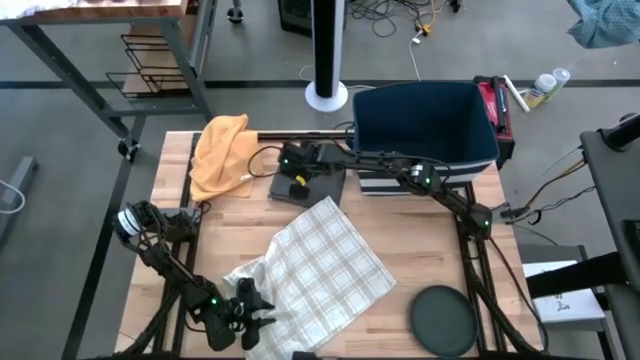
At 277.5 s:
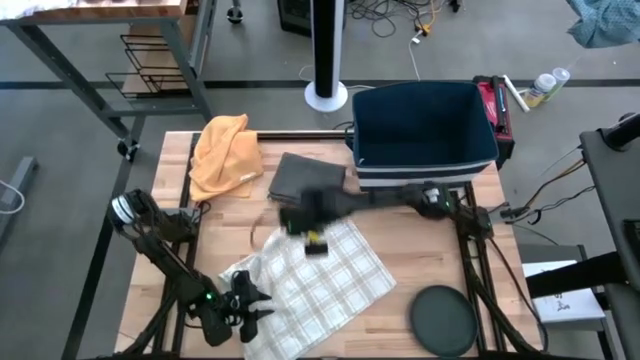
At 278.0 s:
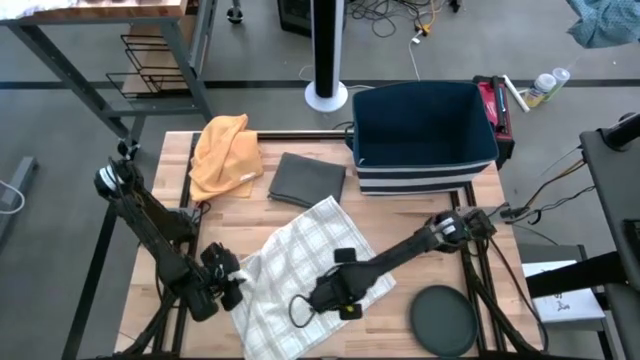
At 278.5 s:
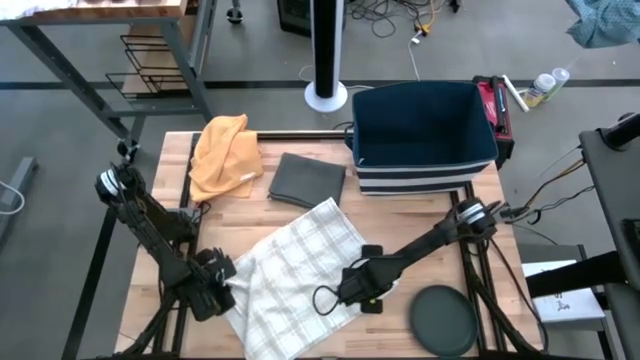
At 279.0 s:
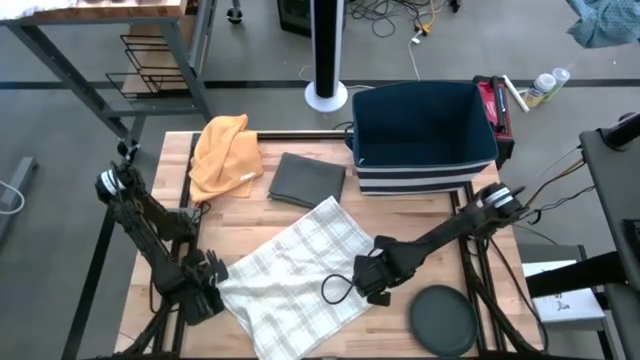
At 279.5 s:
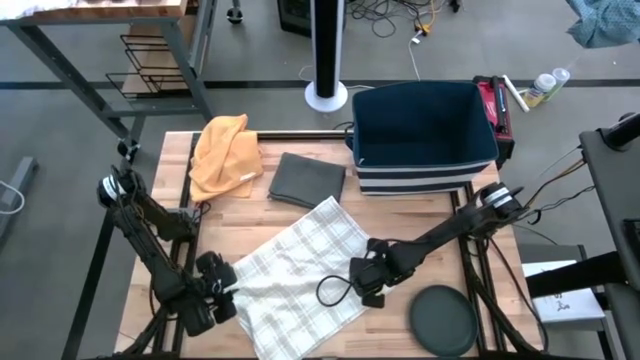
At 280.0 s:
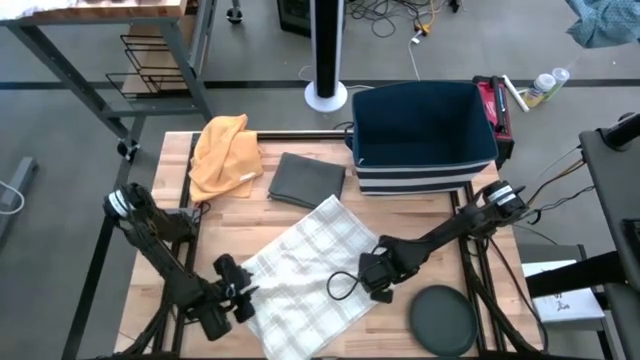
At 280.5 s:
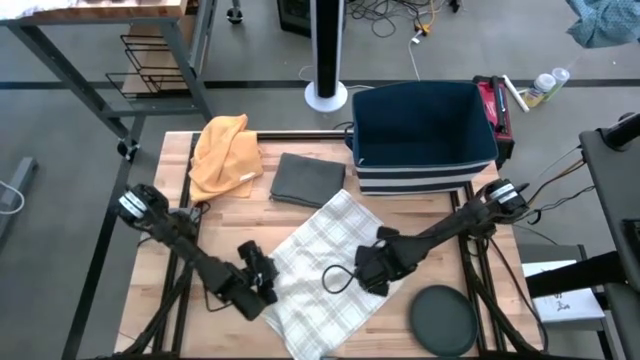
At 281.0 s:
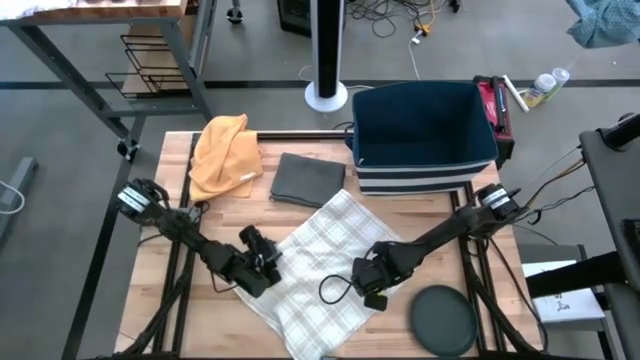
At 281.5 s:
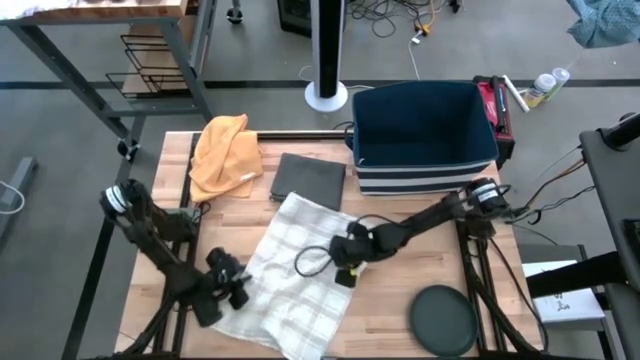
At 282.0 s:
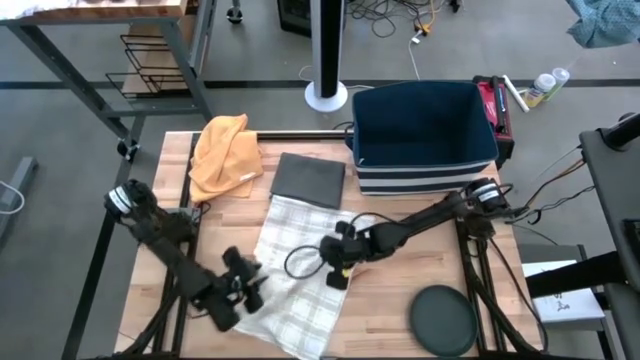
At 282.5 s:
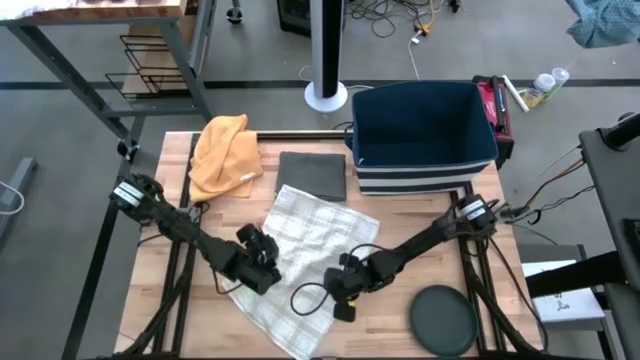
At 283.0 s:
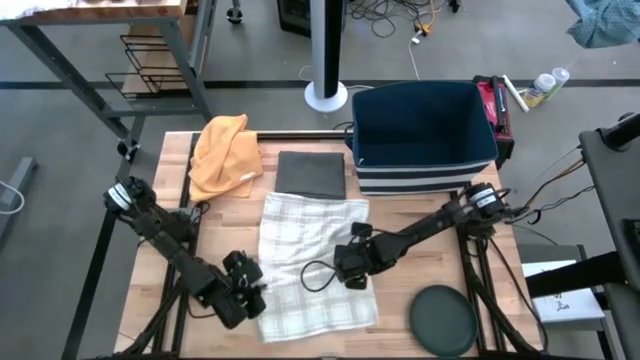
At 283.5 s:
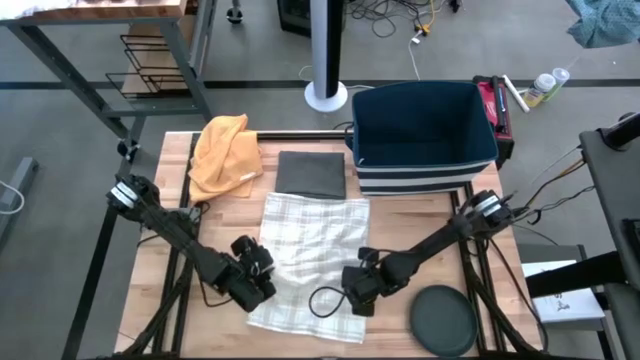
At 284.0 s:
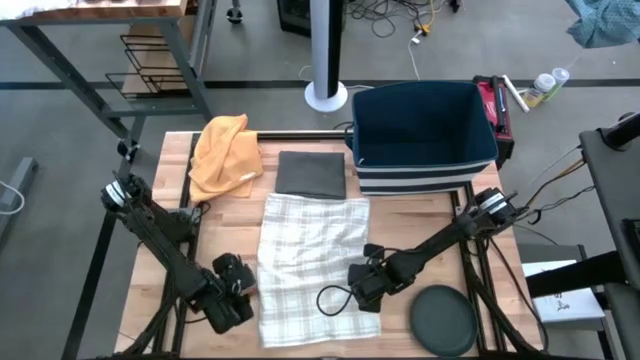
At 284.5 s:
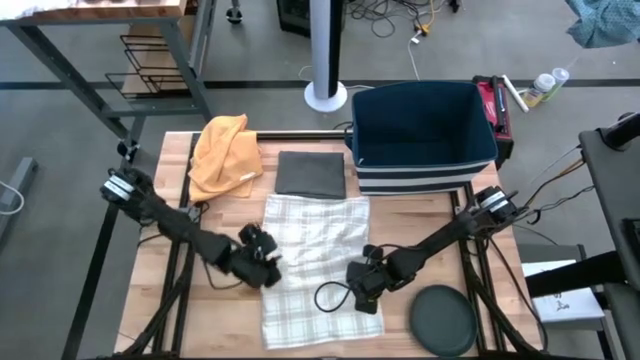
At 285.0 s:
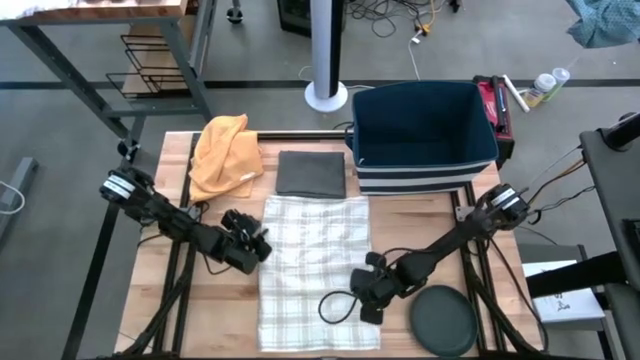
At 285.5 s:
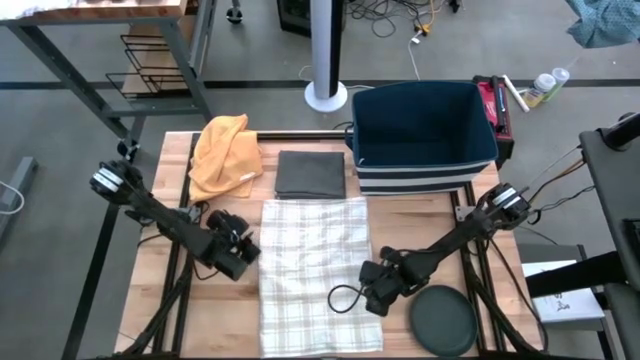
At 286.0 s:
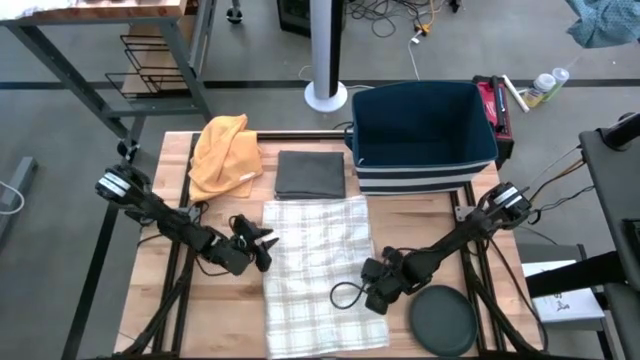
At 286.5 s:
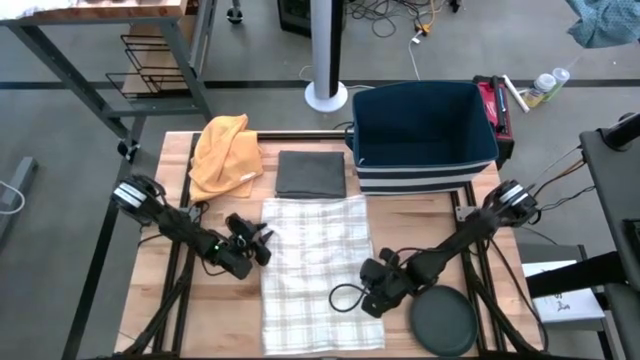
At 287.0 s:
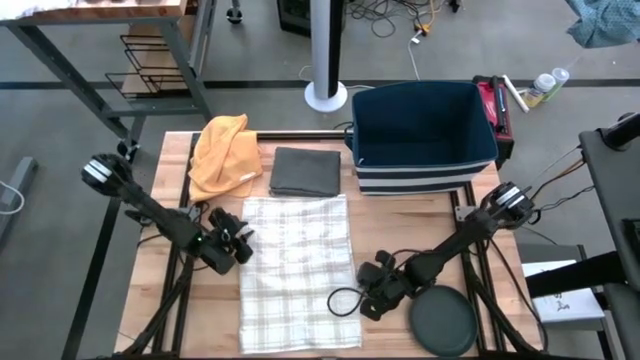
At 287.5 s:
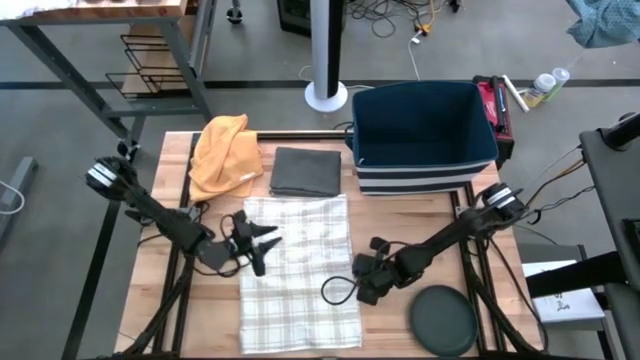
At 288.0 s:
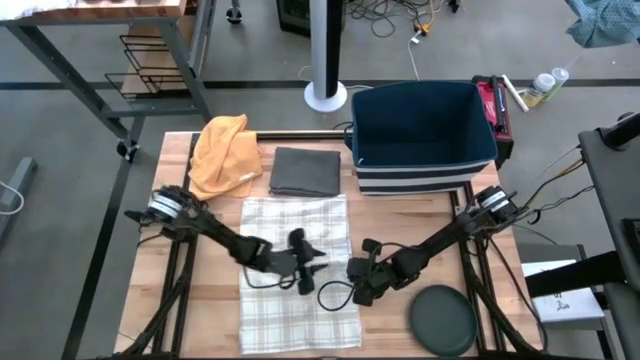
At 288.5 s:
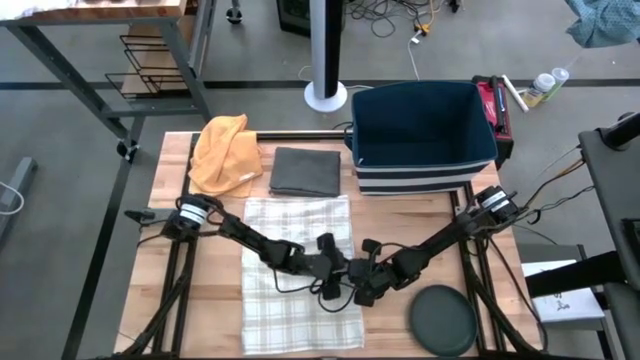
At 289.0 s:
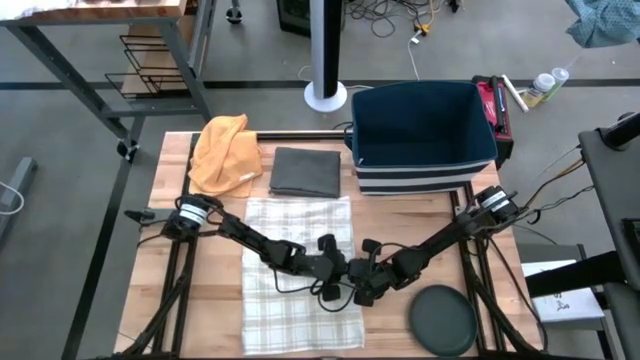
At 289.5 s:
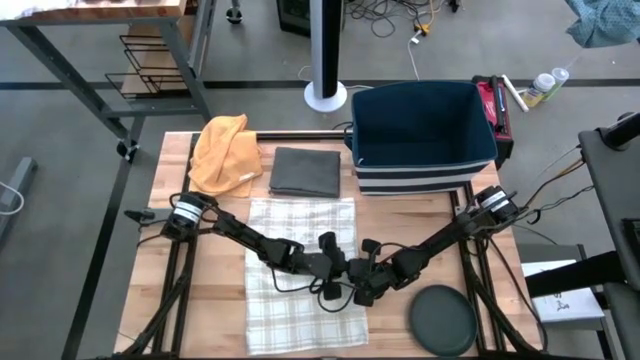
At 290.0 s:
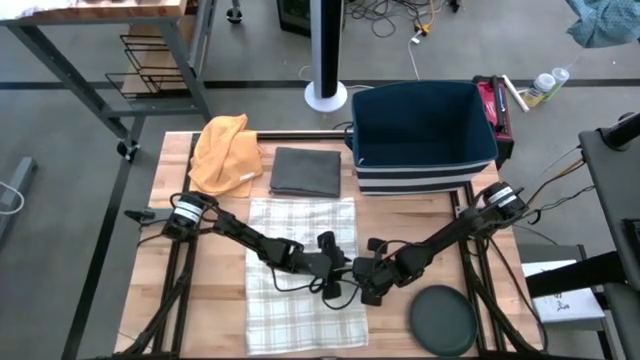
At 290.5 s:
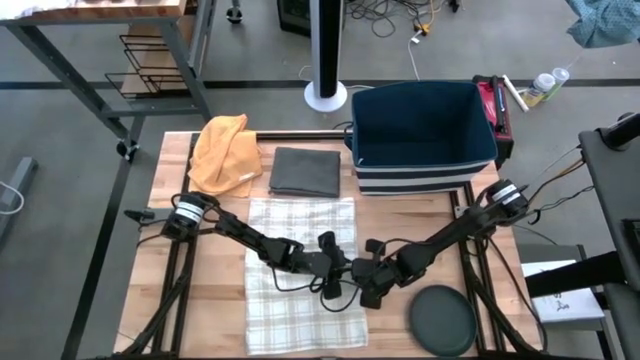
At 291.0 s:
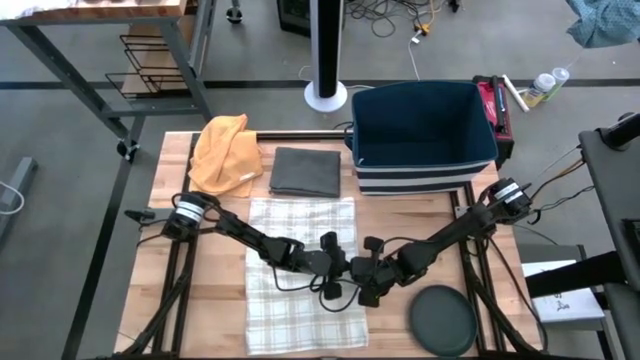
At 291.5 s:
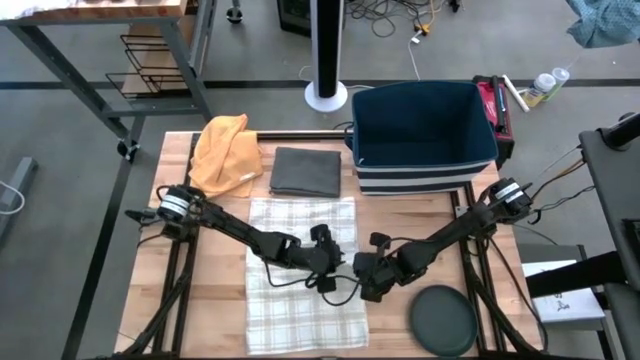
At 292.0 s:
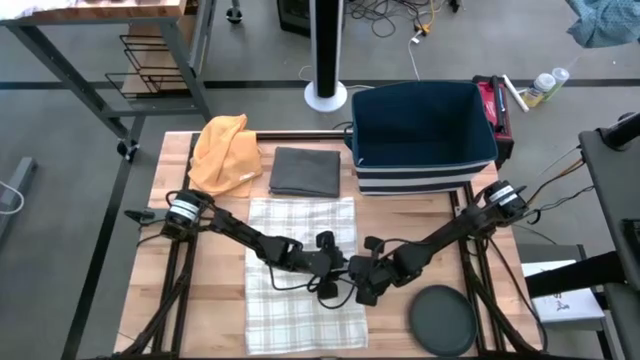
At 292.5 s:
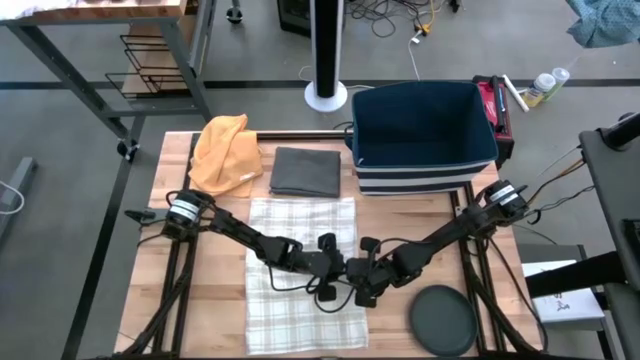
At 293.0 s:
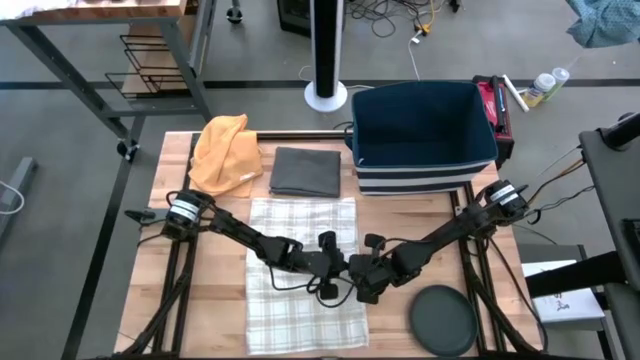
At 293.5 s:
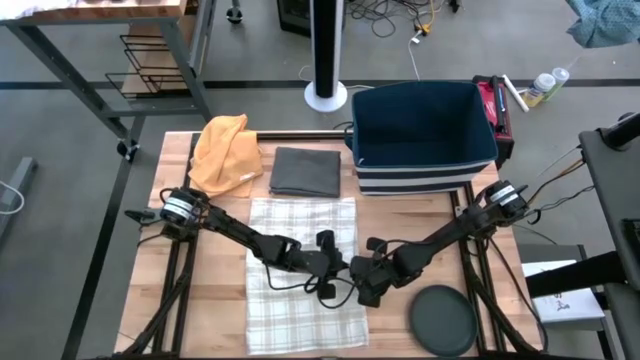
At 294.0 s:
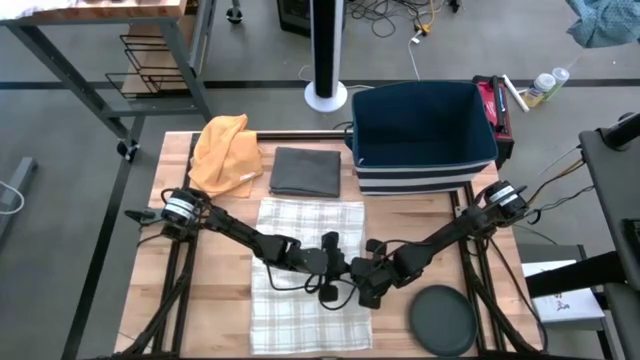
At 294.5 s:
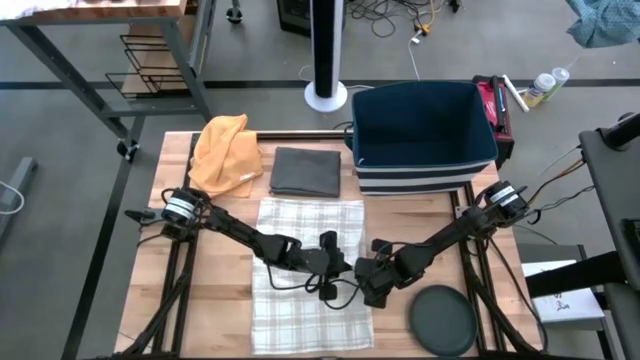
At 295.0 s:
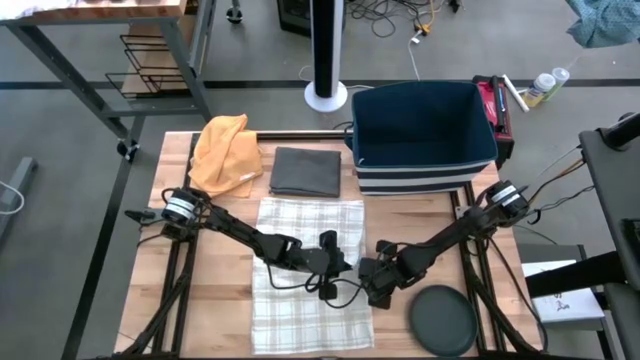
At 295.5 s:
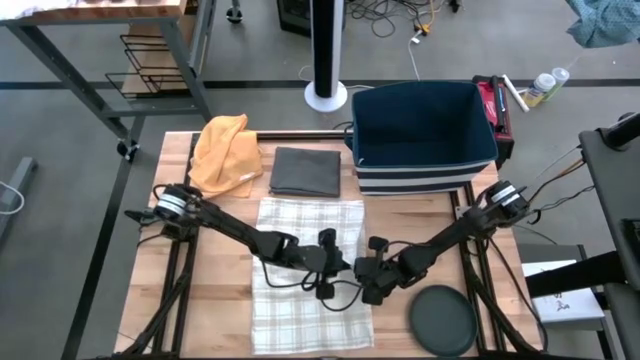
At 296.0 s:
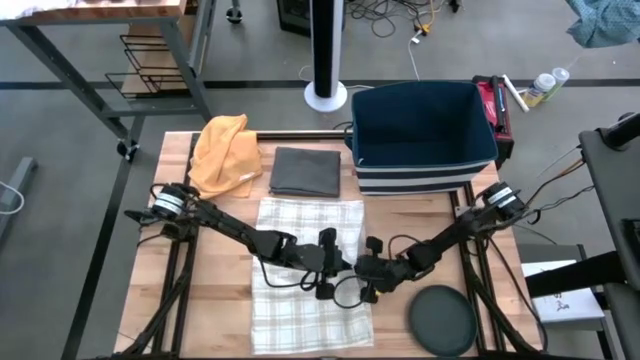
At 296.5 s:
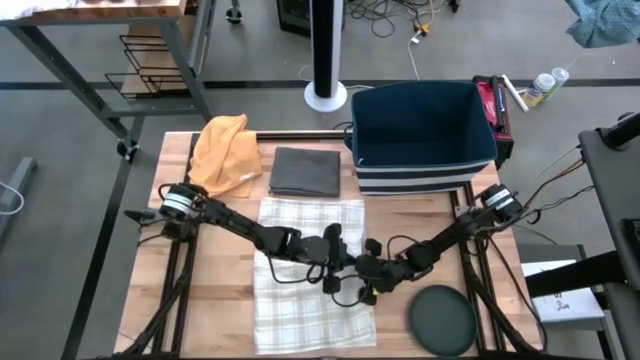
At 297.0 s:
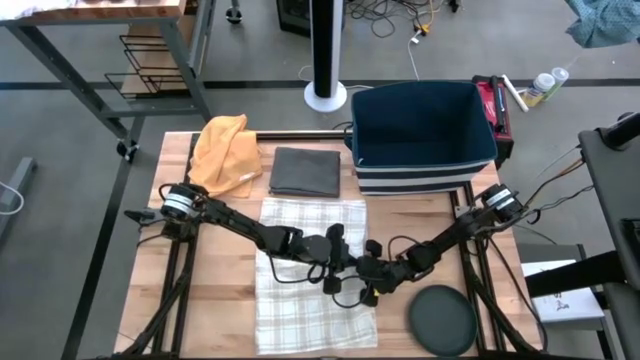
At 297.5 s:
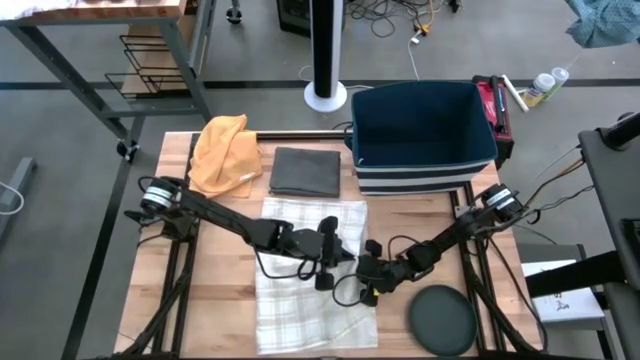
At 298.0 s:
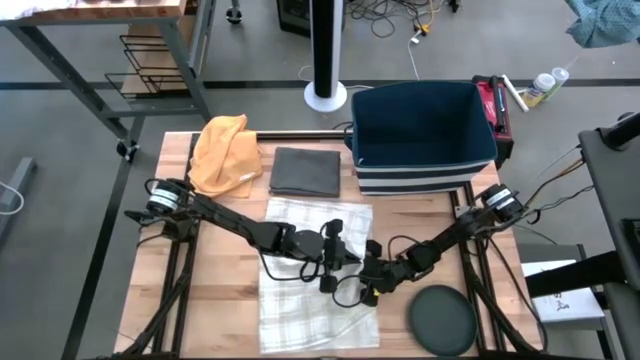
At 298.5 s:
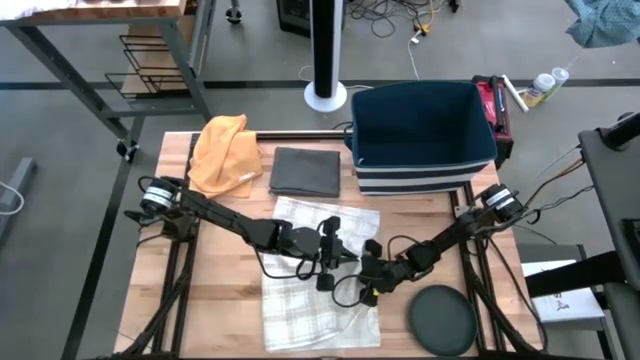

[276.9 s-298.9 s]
Task: Fold kitchen towel into neat rectangle
Fold the white patterned towel

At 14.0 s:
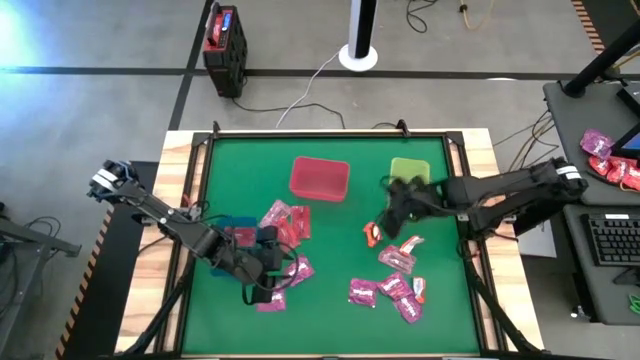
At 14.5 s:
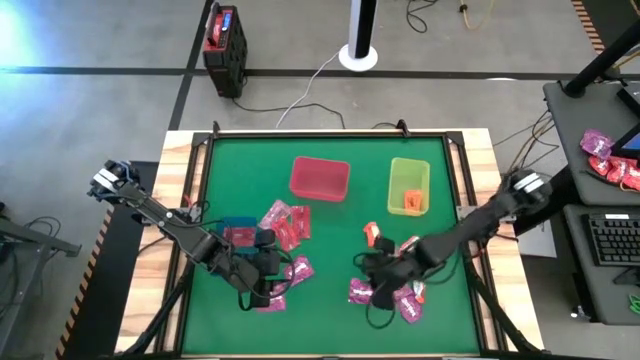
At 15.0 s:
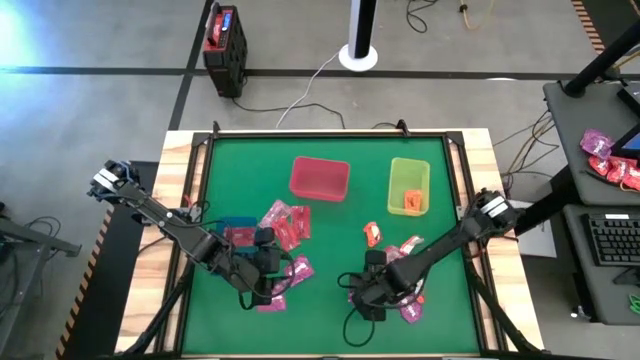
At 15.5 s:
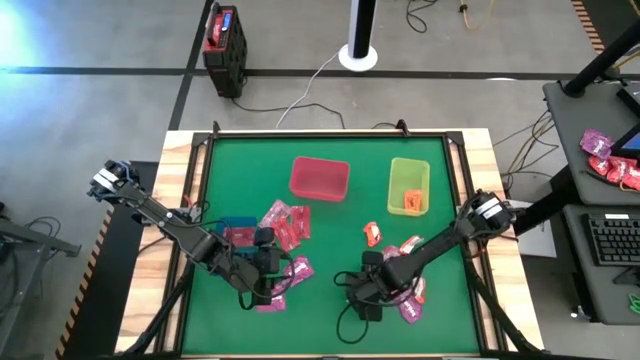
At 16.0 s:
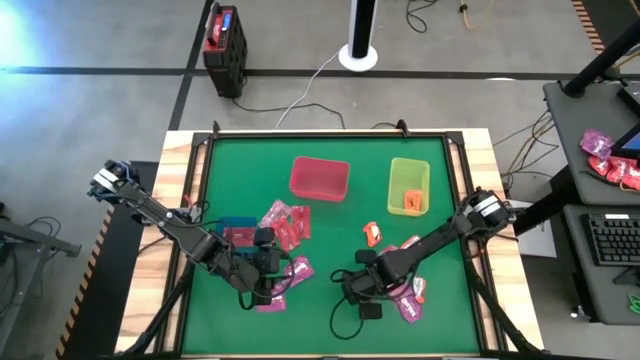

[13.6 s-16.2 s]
Task: Sort candy by brand, put in halloween buckets
Put the violet candy into the red bin
